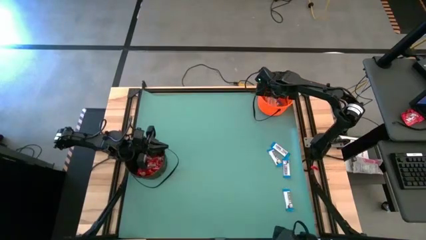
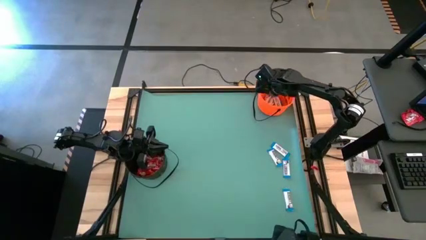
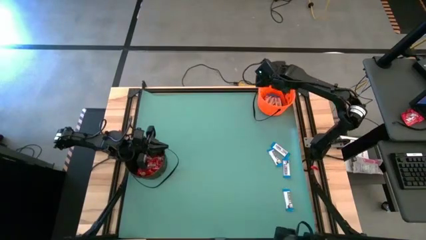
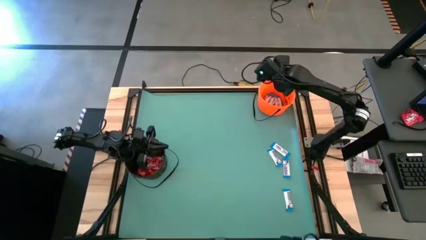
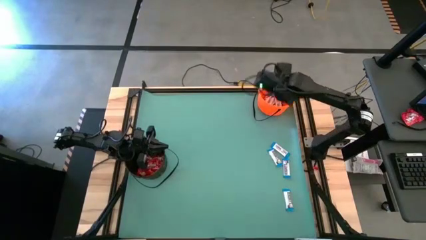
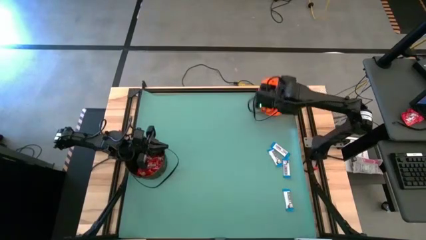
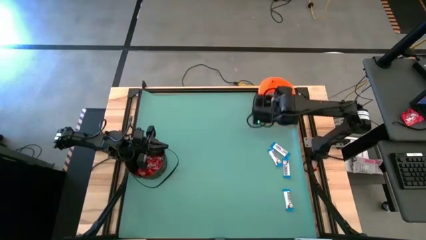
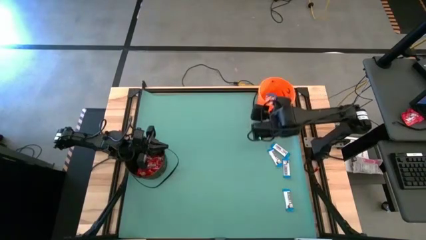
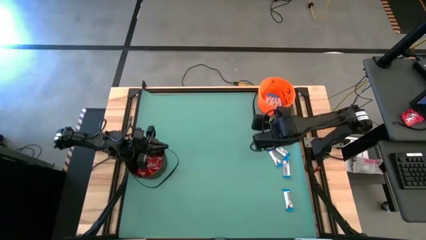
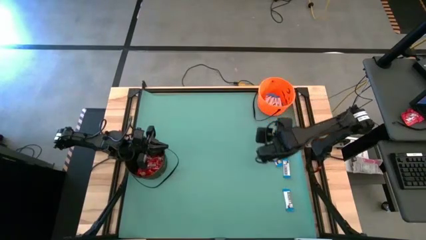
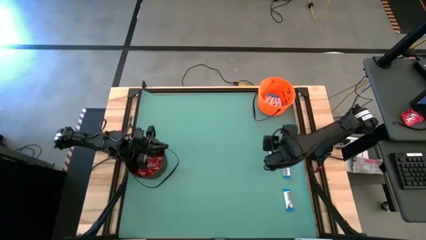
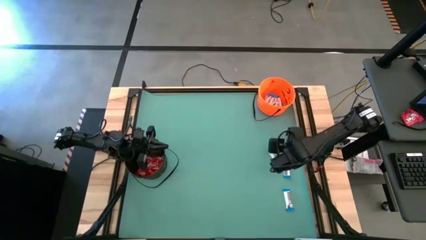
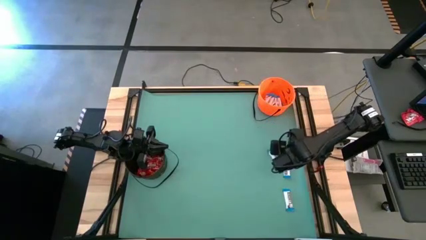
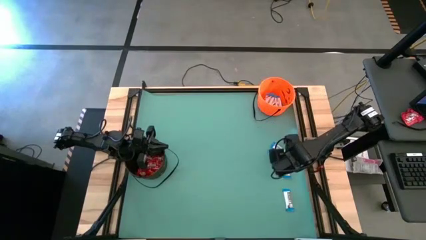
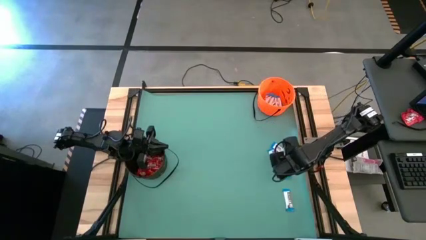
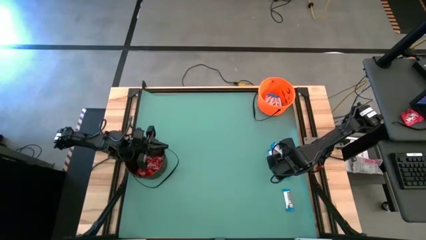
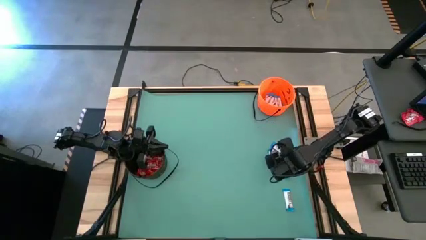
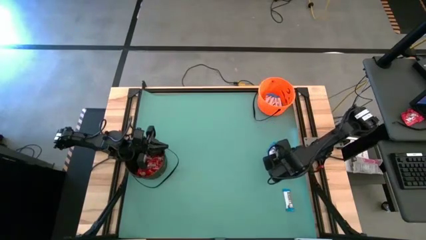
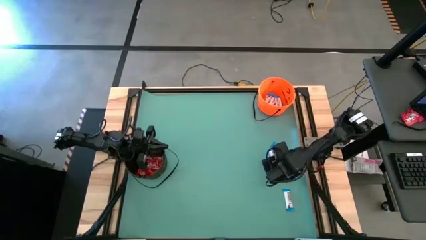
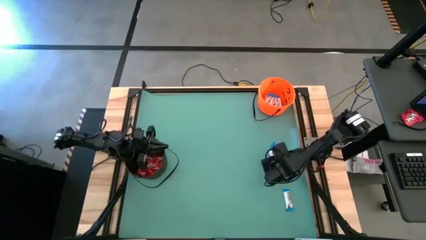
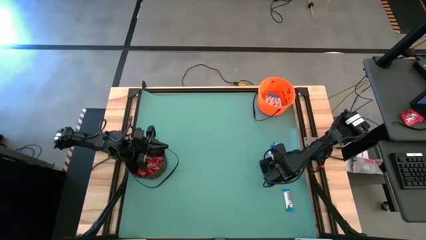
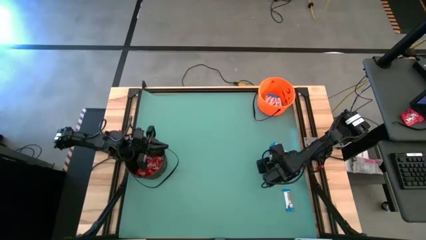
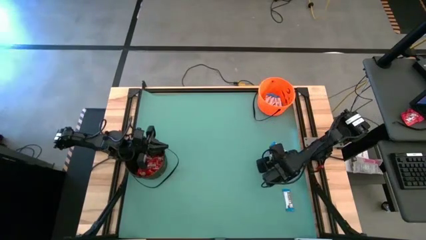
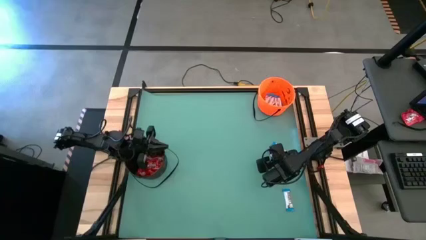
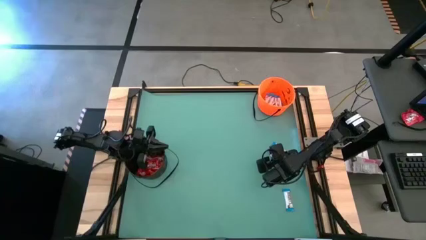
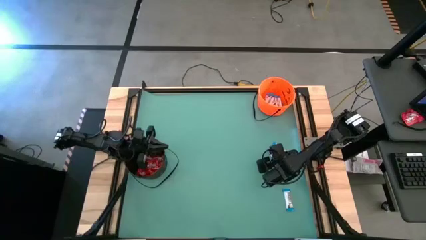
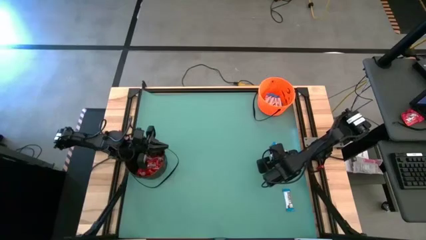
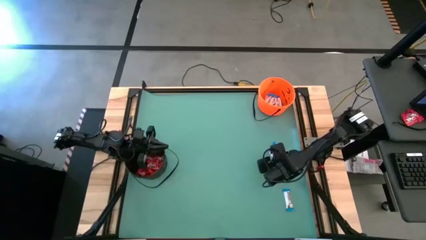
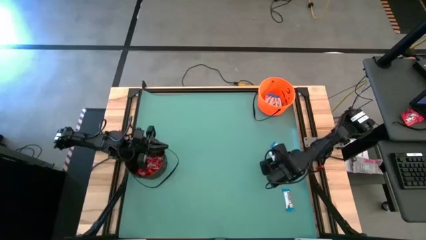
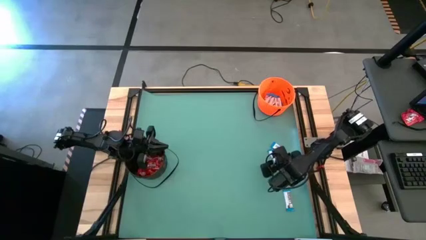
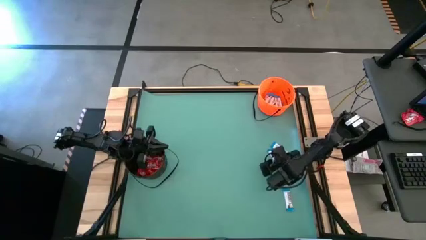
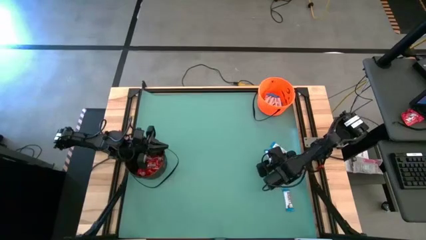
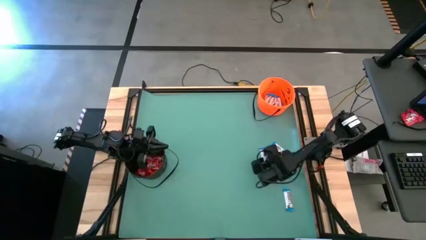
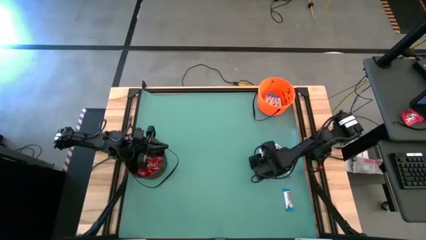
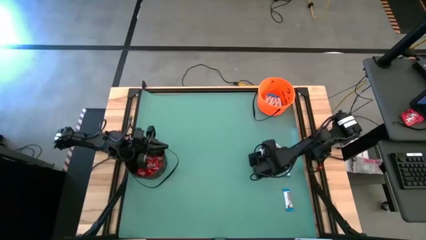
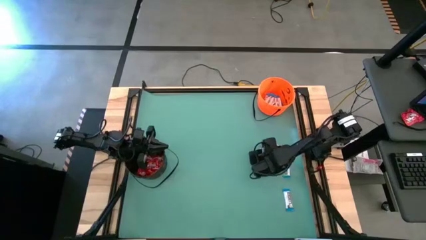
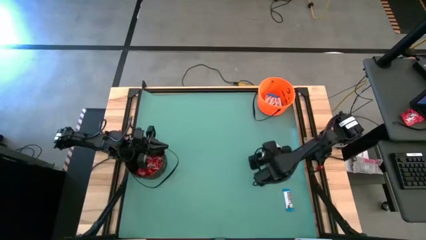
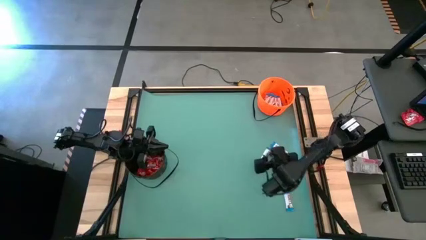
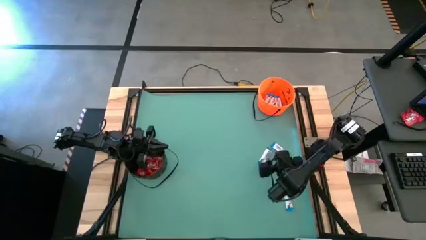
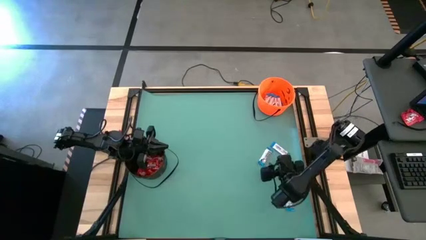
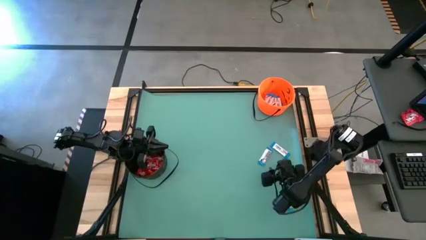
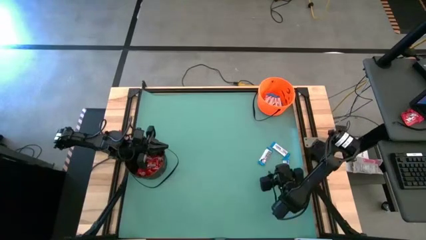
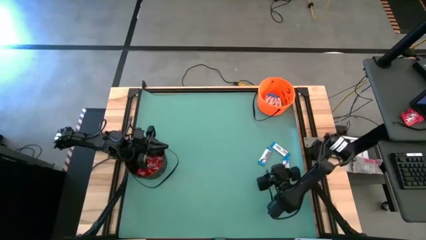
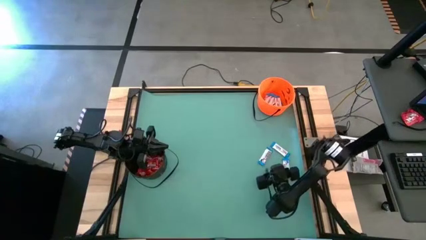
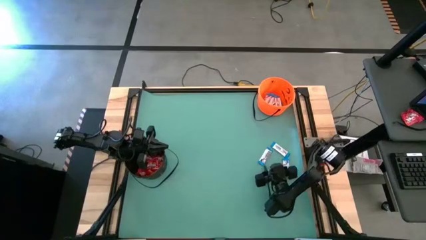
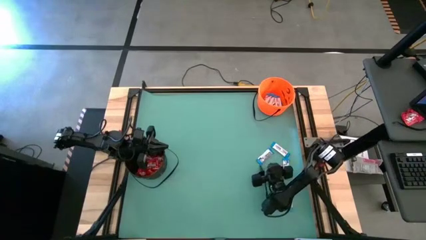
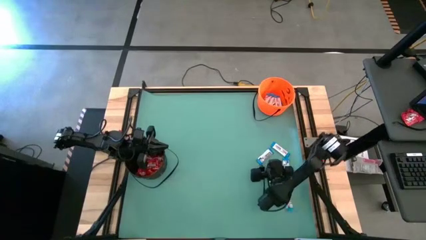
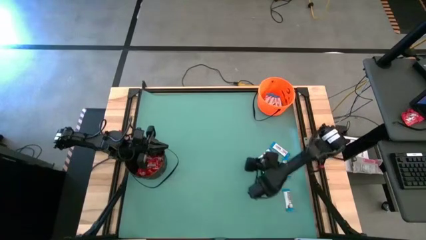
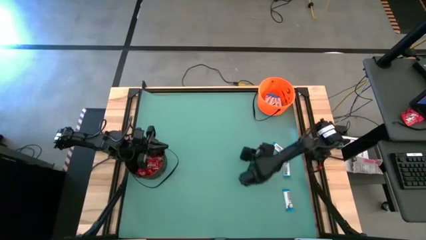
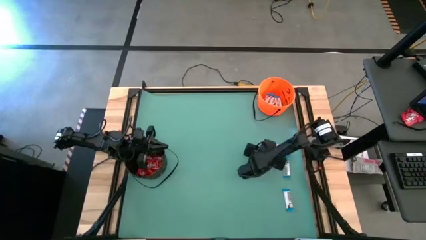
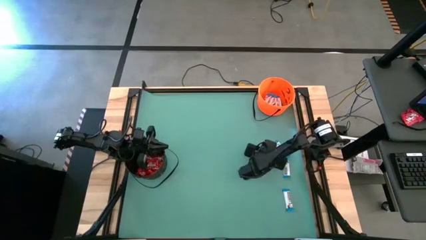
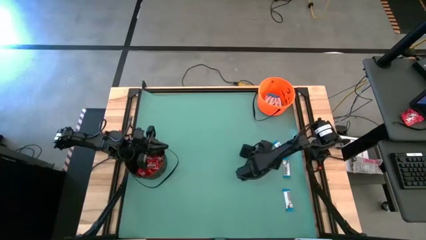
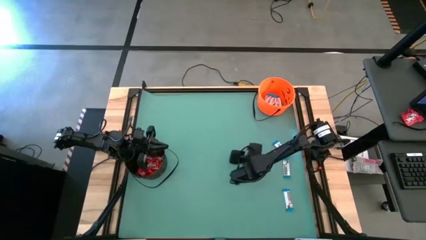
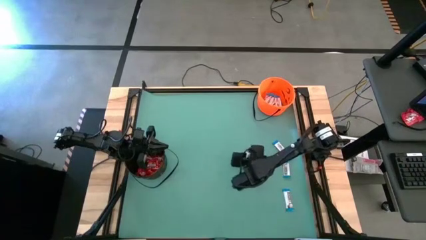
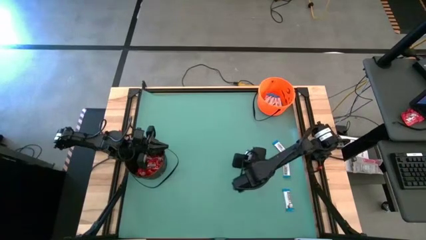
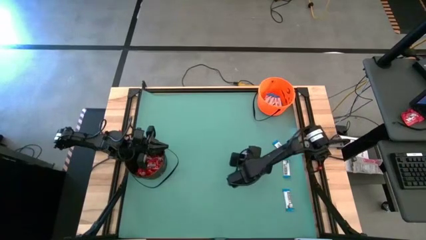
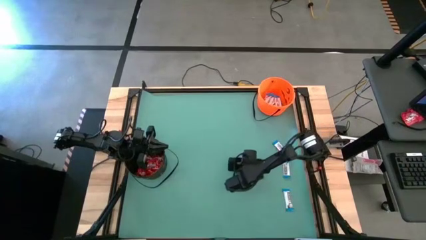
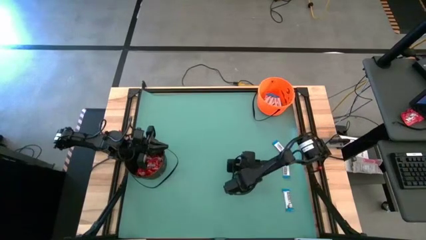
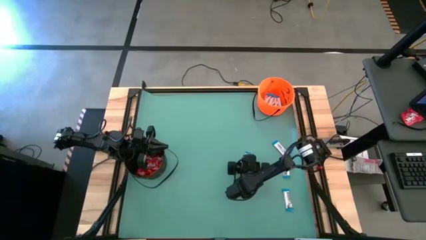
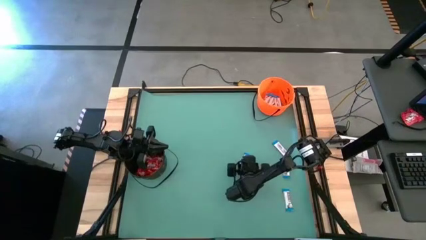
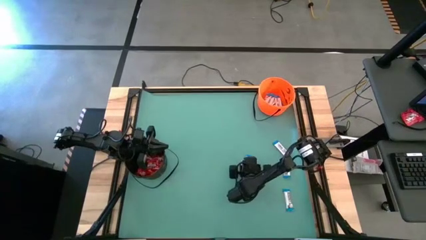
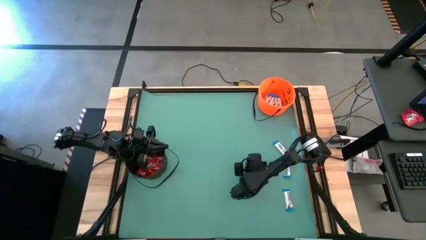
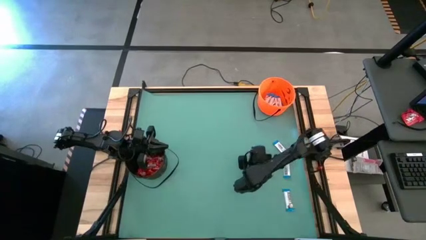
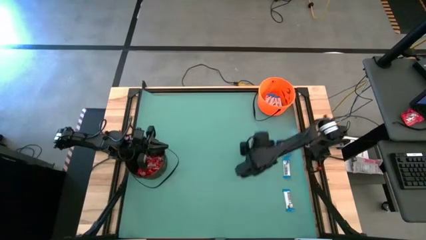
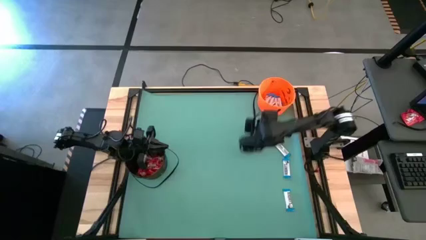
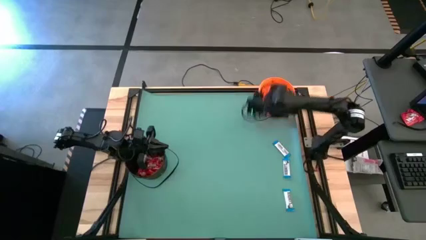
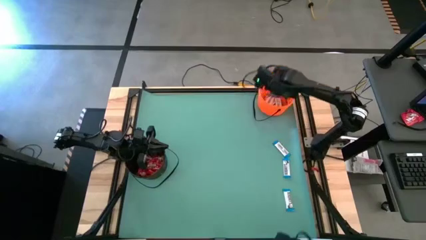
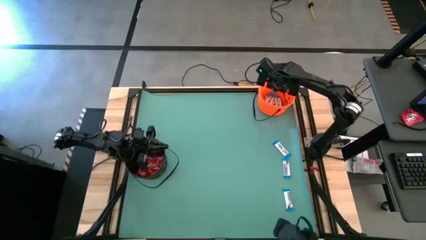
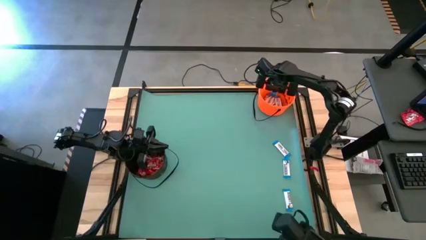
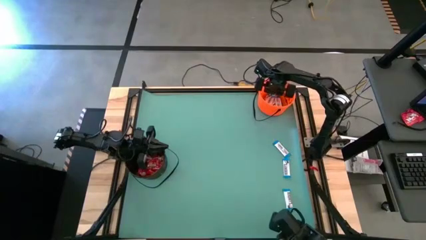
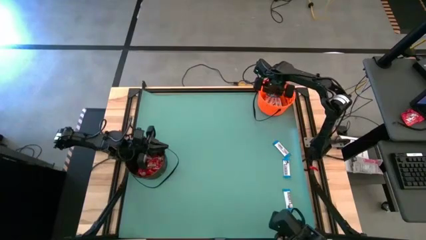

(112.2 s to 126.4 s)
Task: Sort candy by brand, put in halloween buckets
Put the white chocolate into the orange bucket

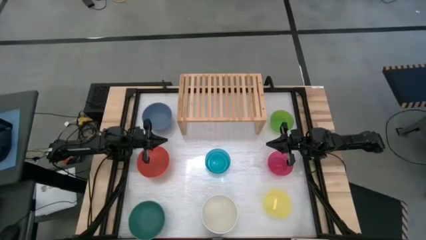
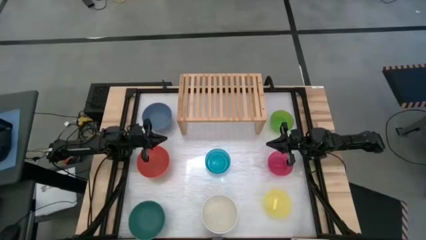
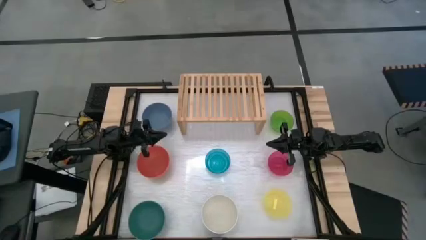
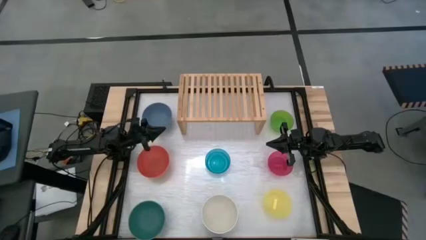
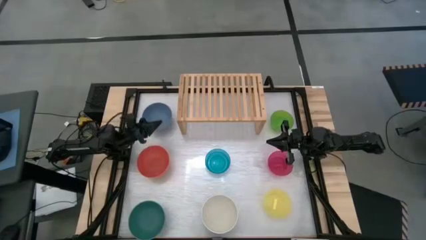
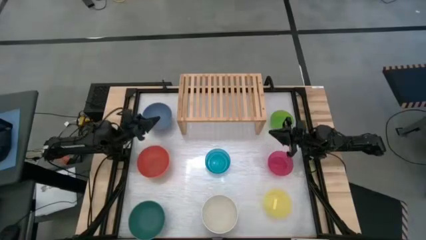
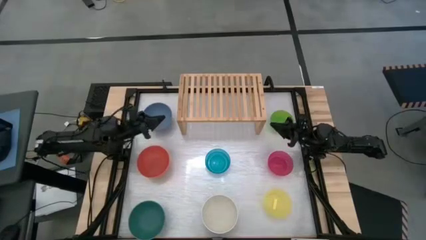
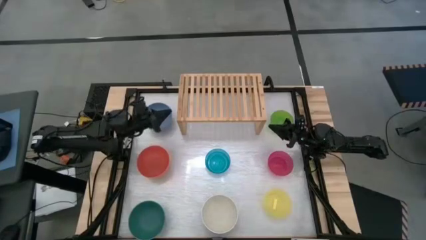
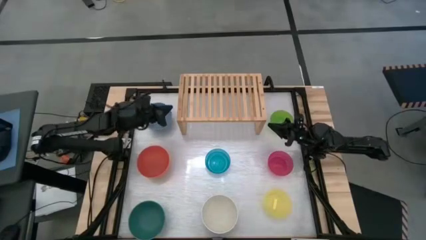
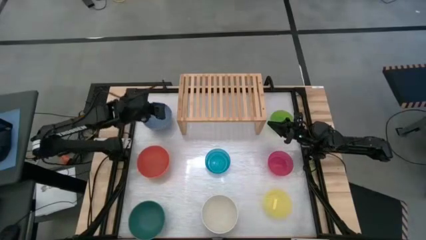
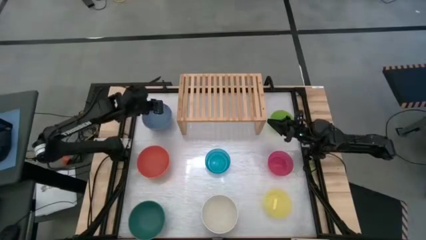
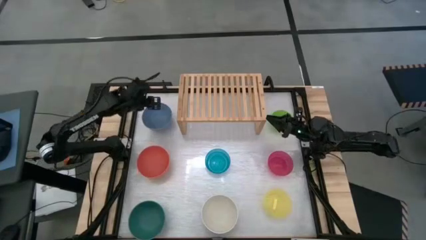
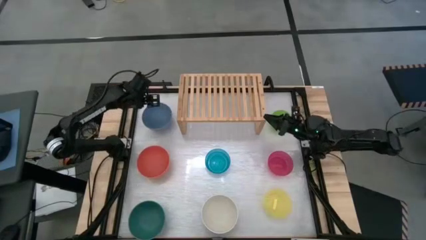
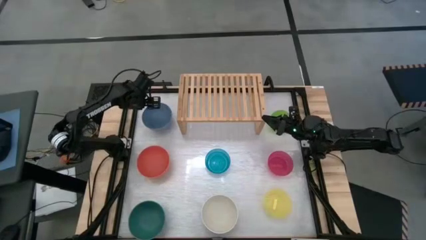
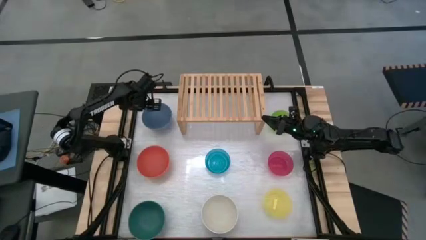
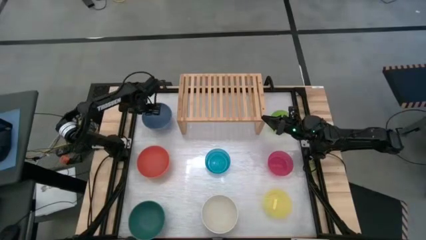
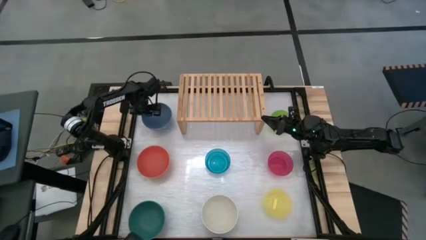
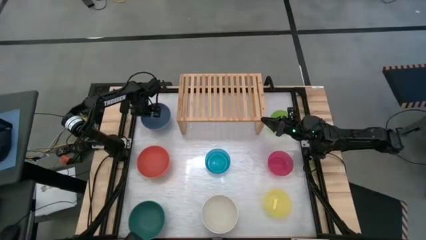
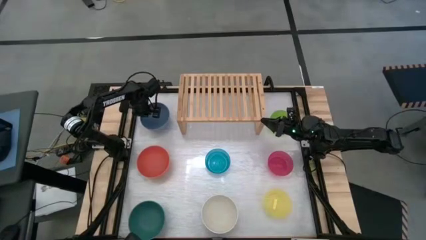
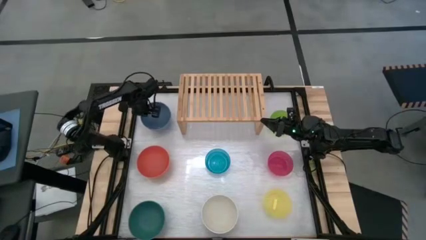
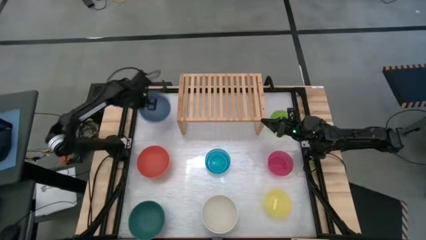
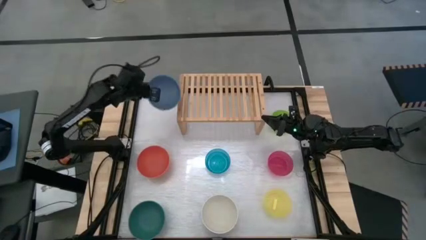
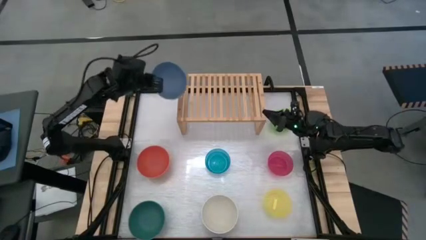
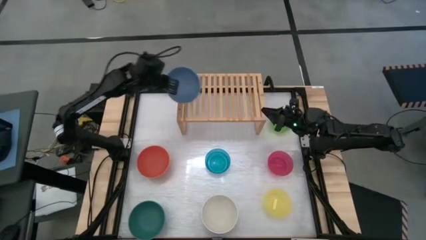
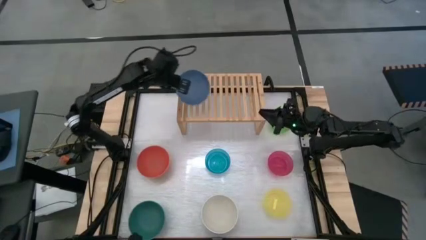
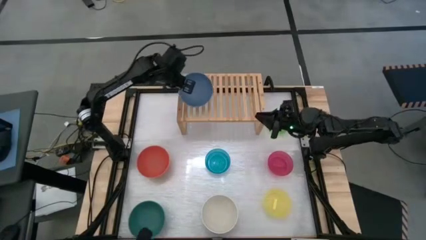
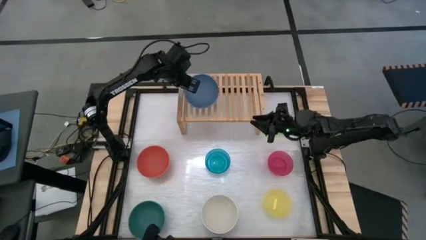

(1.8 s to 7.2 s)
Task: Place and stack bowls onto a shelf
Put the blue bowl on the shelf
